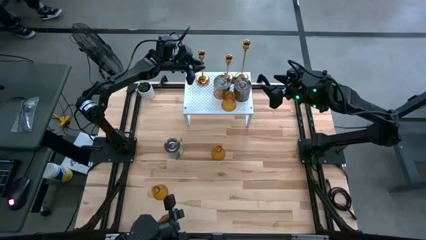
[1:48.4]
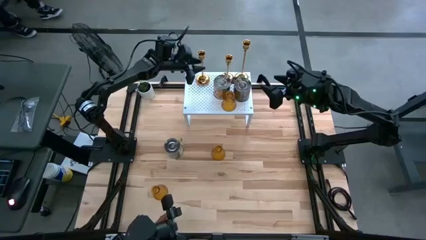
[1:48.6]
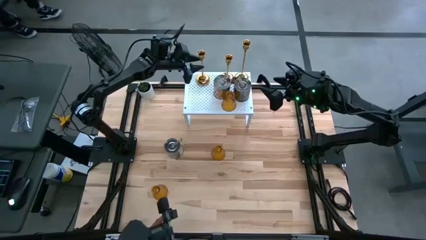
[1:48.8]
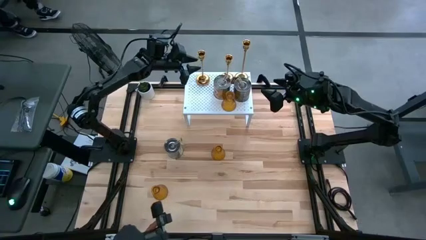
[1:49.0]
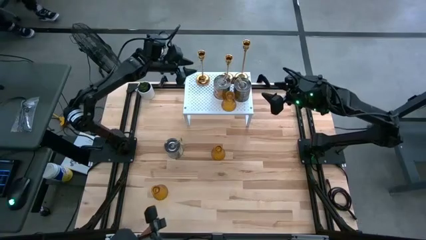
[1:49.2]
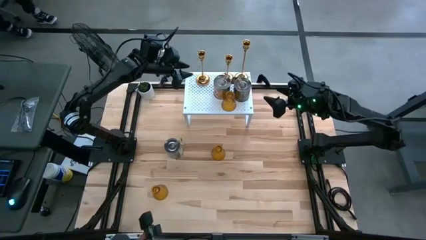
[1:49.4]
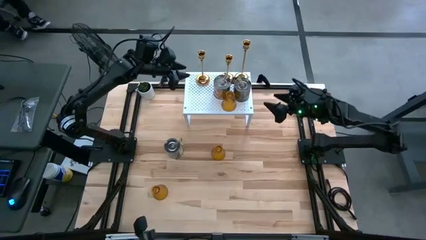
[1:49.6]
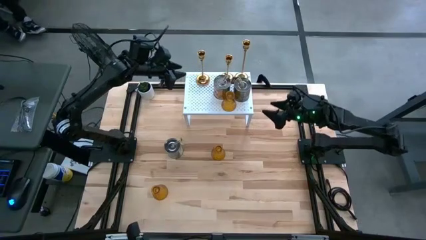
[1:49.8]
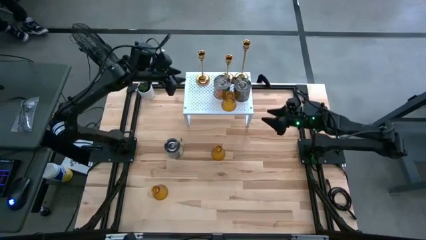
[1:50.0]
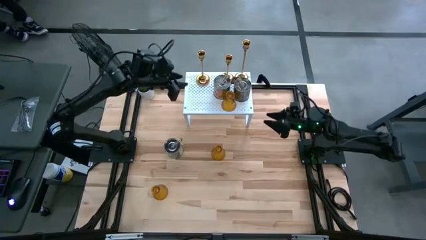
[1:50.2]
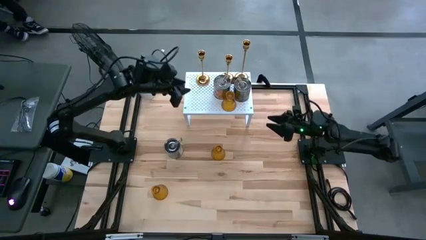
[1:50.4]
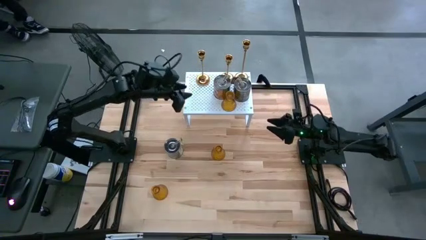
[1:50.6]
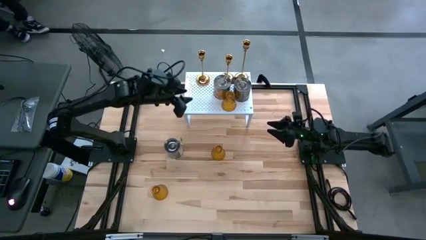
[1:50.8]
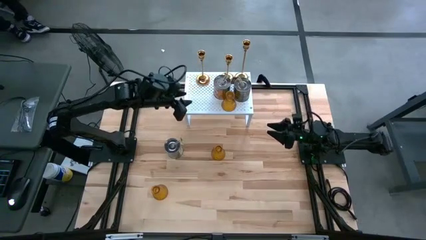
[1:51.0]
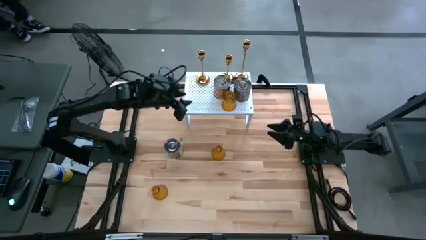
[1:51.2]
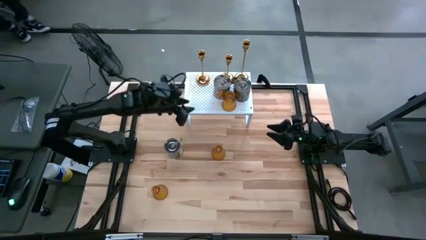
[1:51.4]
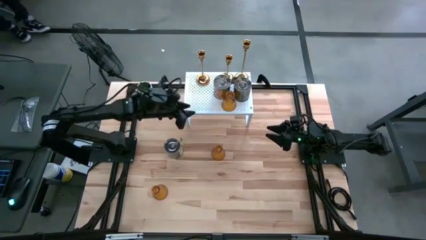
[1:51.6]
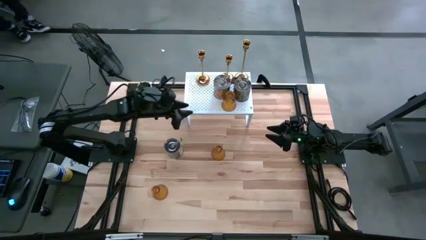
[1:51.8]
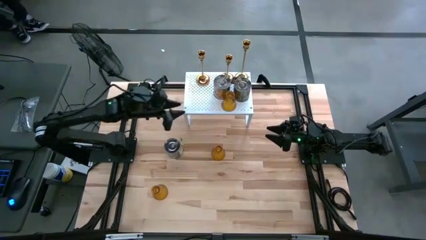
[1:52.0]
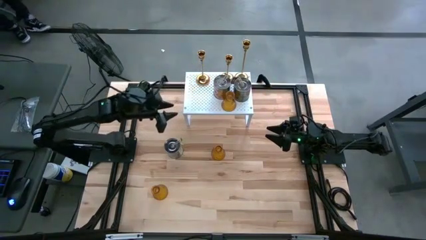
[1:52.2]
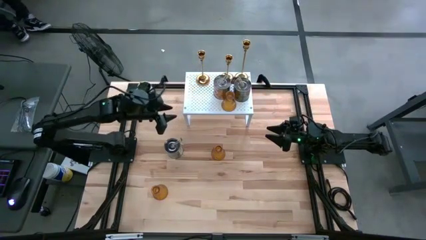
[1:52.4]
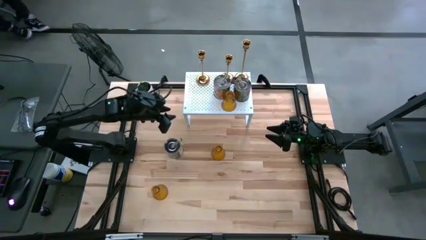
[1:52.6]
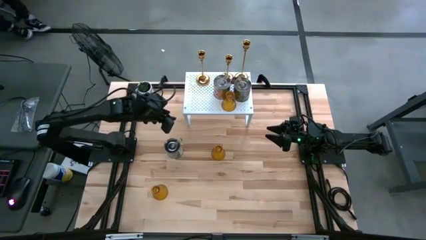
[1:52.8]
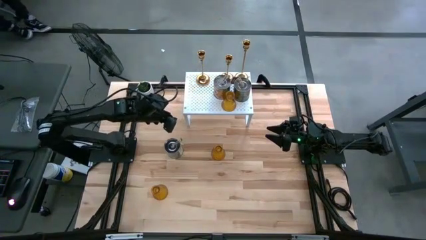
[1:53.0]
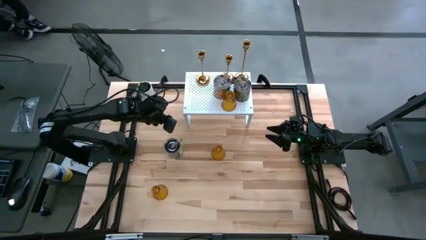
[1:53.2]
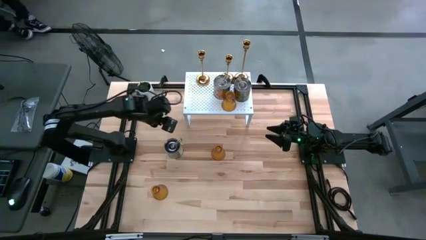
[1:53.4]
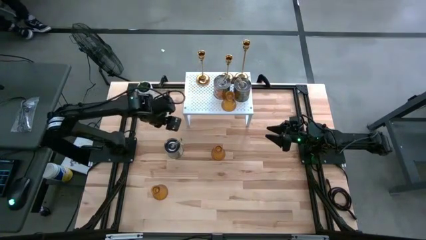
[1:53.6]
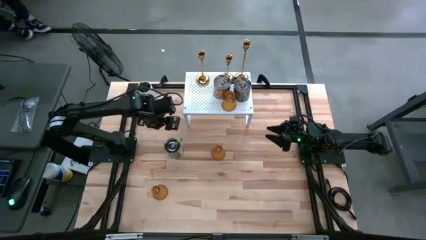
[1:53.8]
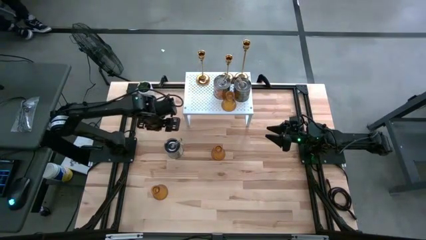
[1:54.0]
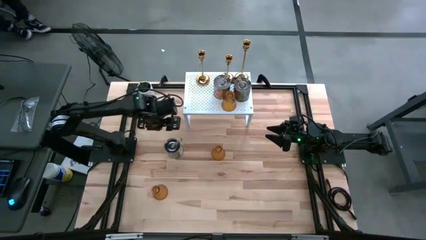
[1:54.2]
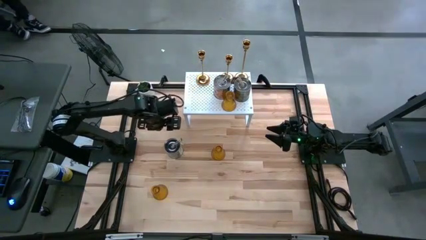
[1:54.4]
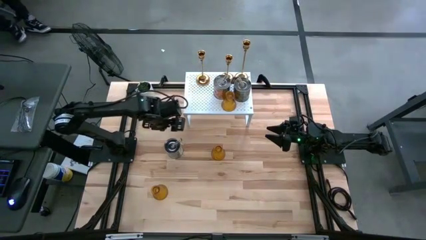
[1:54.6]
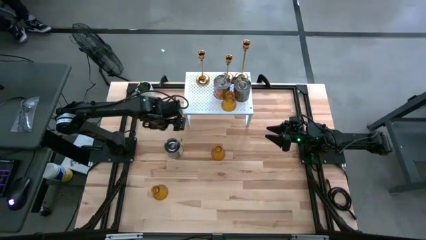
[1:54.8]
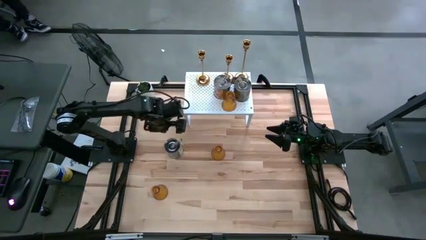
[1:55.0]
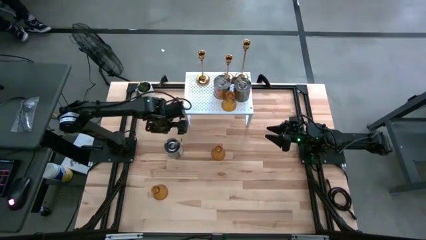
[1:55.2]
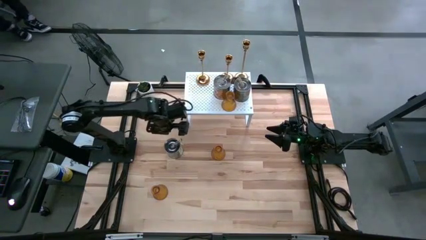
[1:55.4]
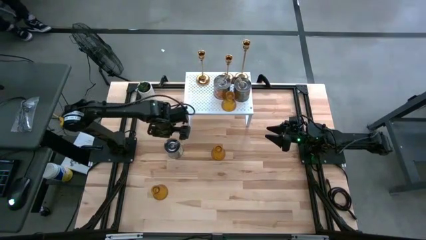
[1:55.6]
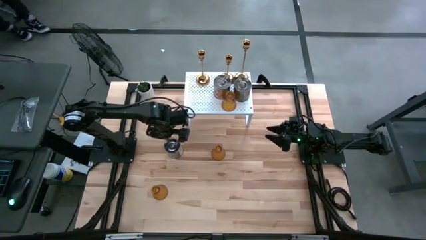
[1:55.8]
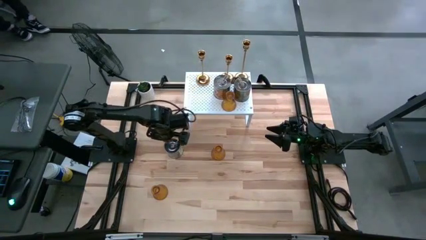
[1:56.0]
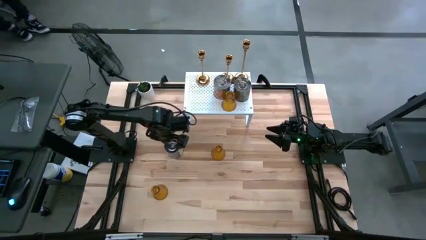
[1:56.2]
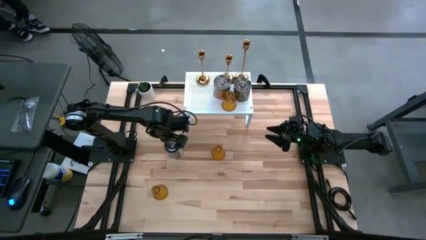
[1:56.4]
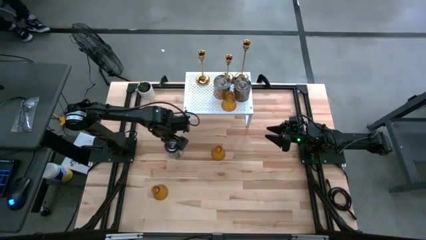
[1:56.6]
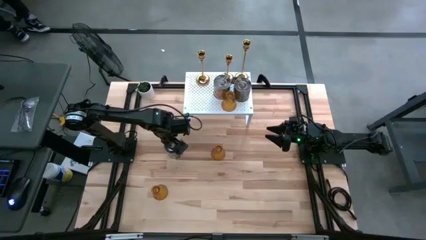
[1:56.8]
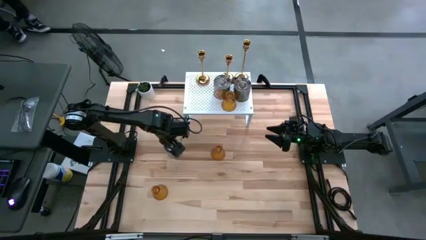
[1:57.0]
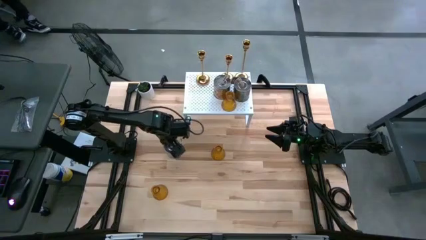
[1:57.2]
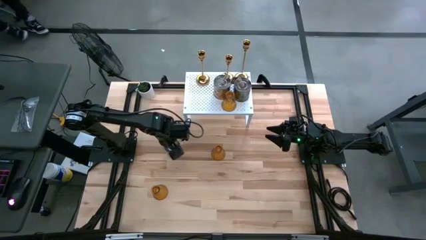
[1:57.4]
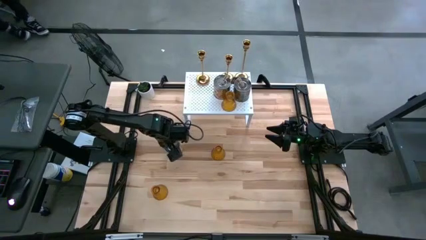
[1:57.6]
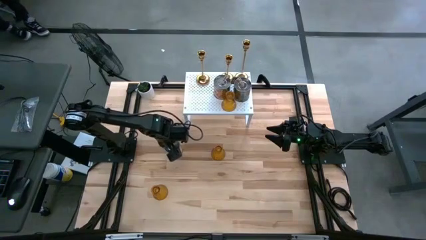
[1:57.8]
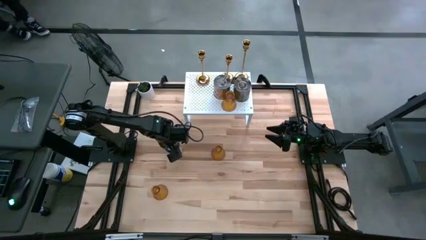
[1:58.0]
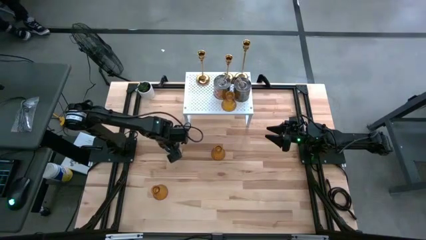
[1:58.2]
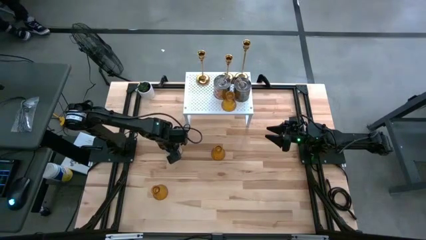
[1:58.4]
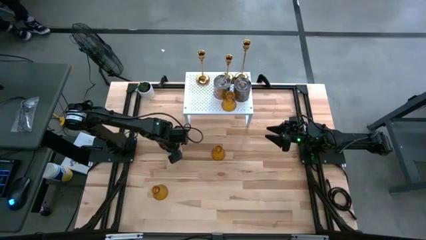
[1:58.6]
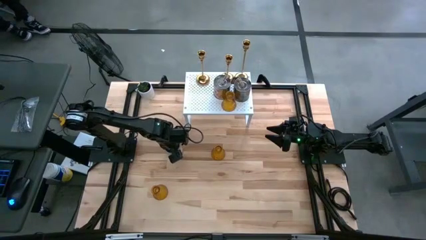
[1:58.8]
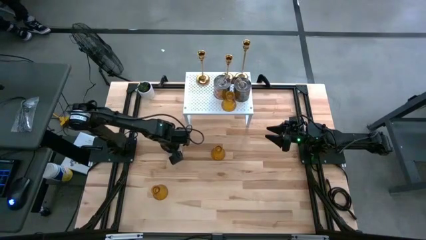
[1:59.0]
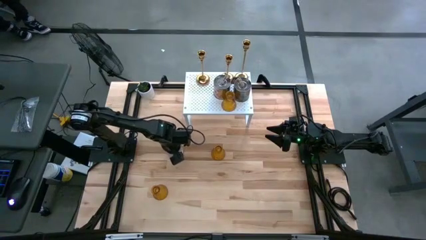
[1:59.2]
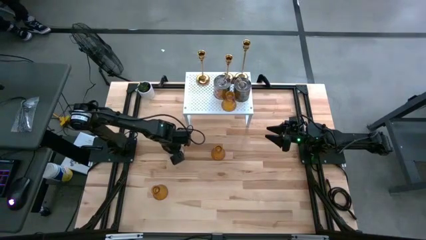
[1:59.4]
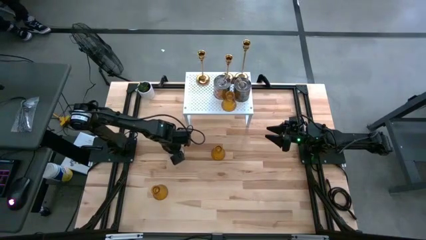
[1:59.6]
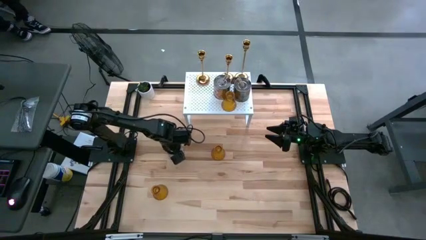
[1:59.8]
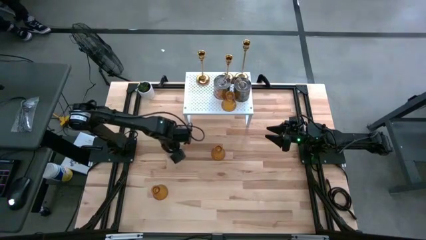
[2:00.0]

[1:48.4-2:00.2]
Task: Pick & Place candle stick holders
Put the green and silver scented candle on the shelf

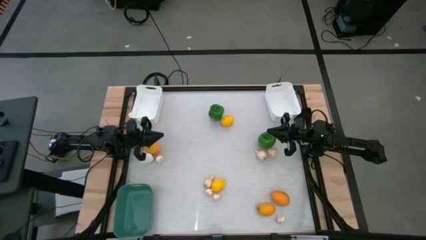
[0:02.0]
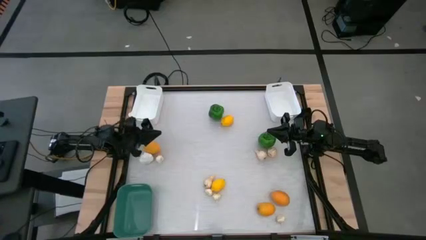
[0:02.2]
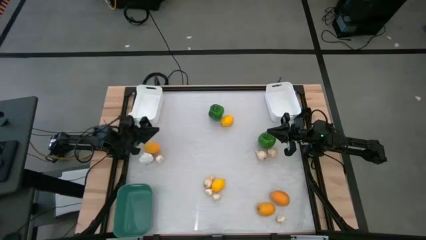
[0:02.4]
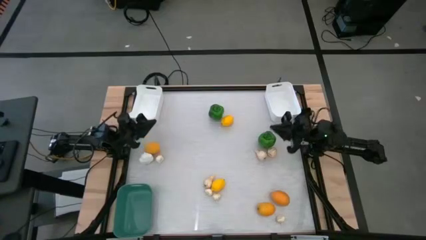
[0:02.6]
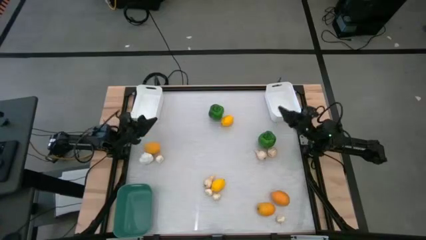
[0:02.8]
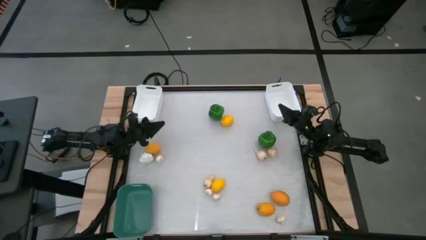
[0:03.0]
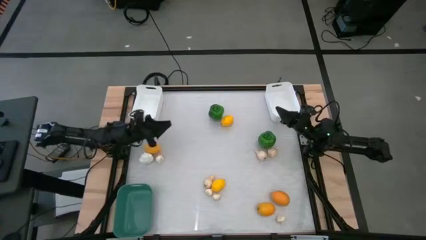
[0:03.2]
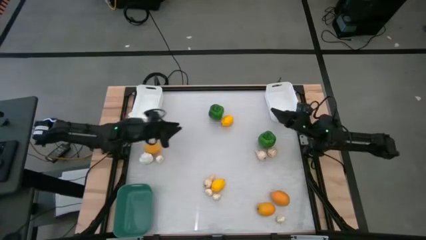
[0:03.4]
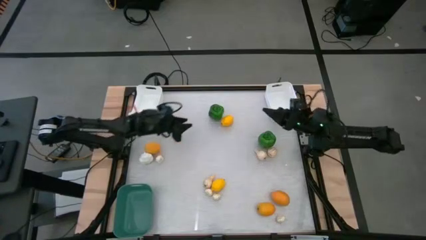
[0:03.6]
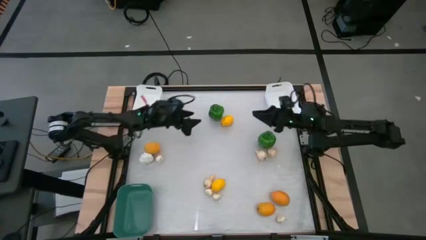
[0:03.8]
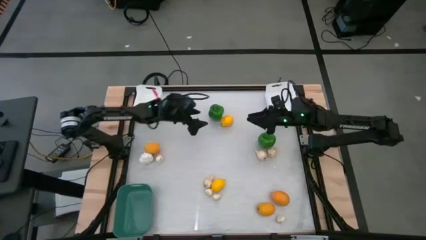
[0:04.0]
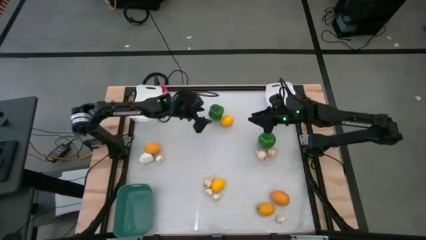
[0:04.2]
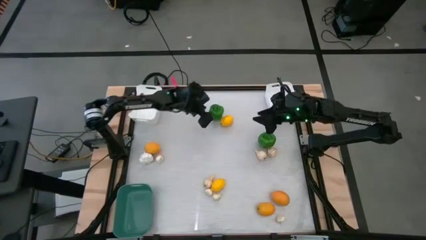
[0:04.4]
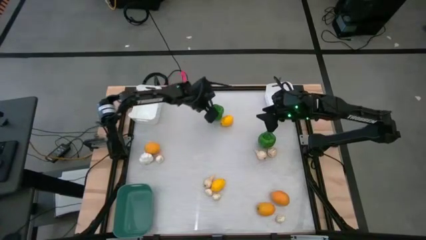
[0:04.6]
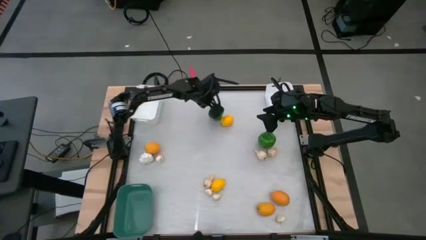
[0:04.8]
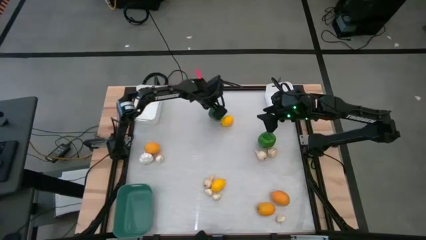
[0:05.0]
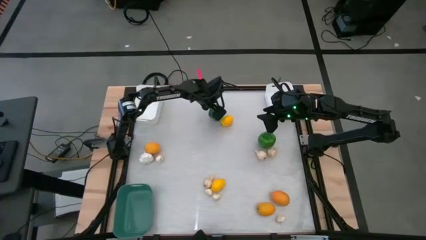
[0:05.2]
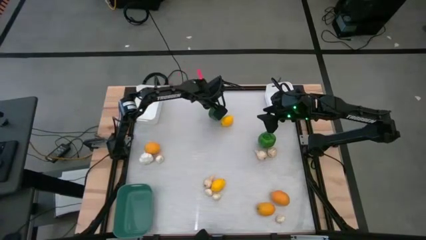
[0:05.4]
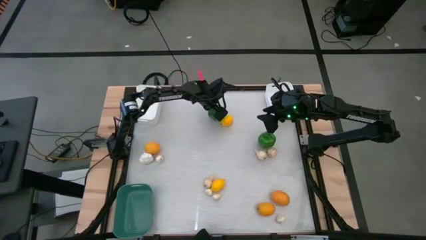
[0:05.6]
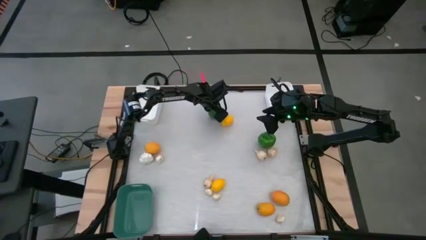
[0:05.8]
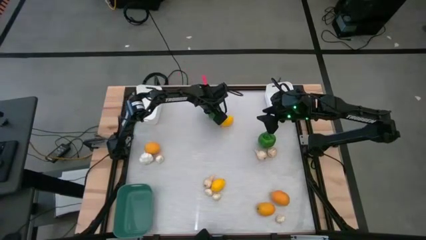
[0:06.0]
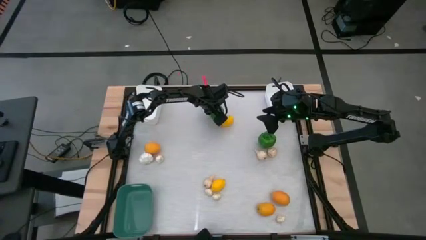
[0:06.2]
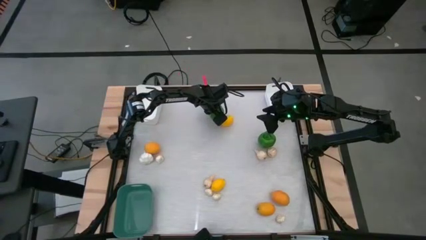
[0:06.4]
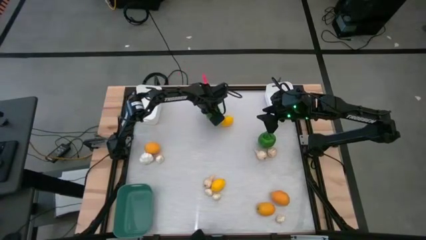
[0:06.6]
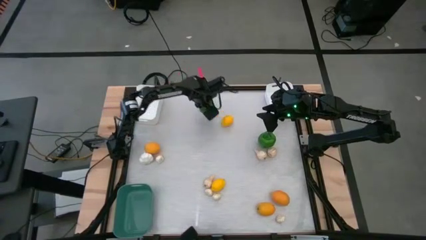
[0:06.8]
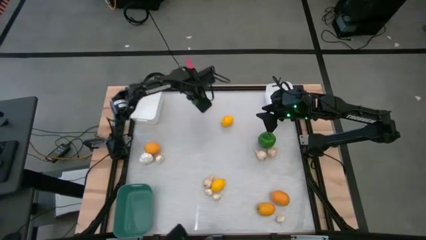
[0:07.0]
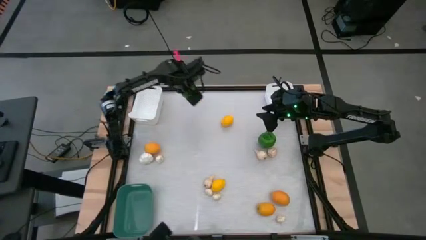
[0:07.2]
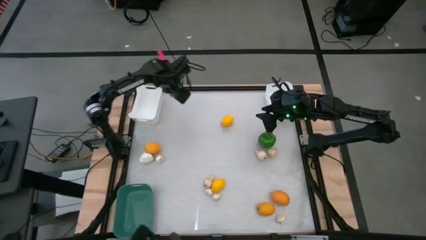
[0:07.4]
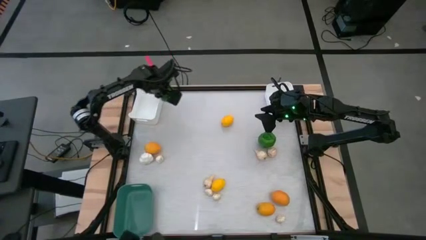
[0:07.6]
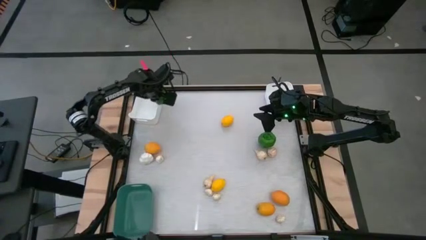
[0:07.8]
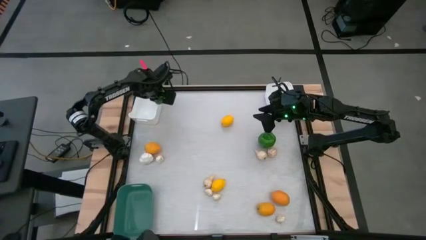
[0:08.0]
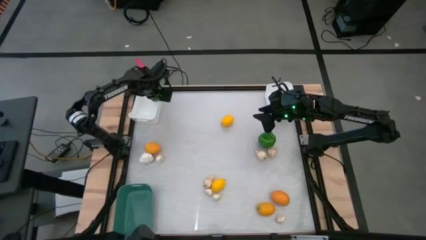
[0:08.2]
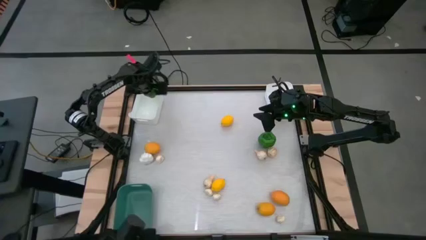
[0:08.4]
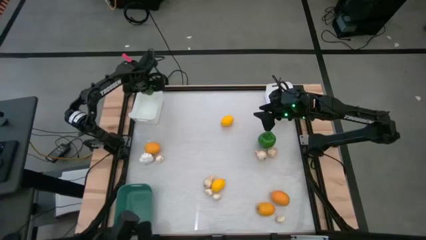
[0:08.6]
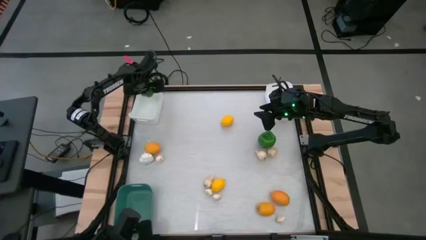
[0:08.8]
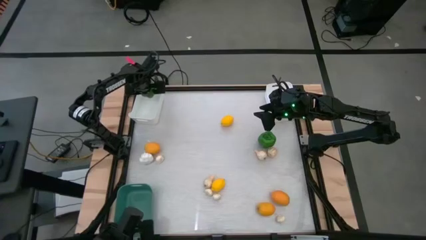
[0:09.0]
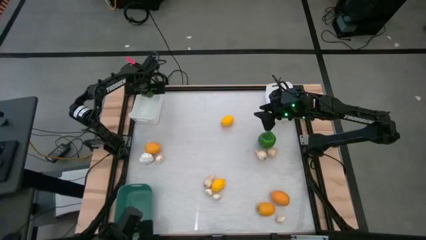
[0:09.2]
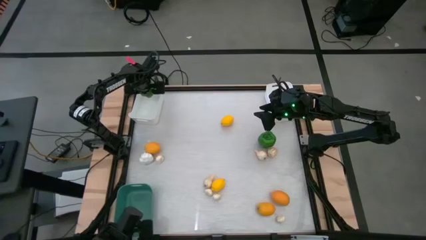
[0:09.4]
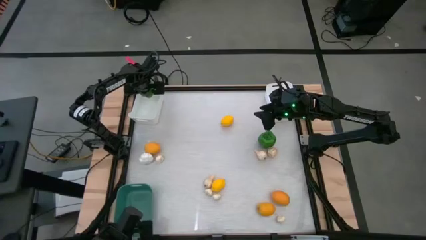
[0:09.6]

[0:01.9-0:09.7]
Task: Sort produce into baskets
Put the green bell pepper into the top left white bin
